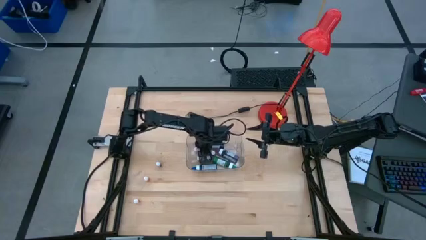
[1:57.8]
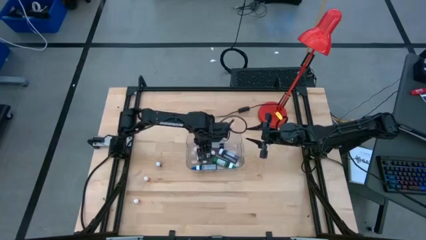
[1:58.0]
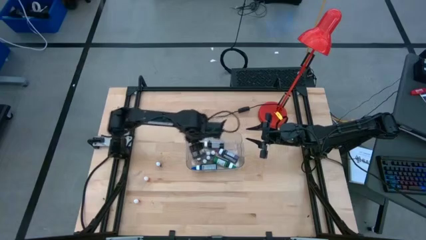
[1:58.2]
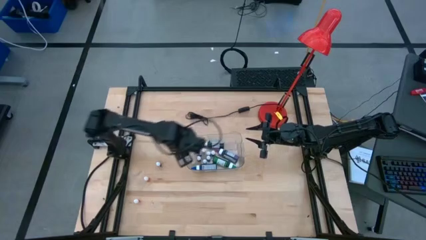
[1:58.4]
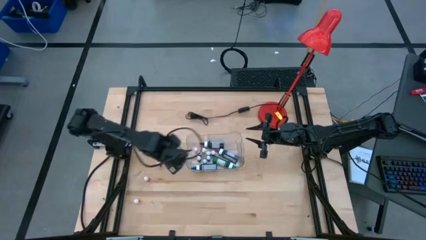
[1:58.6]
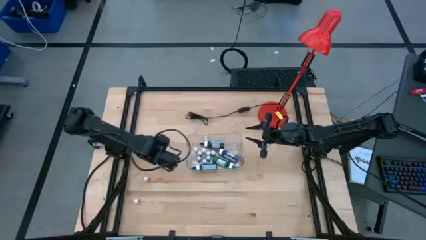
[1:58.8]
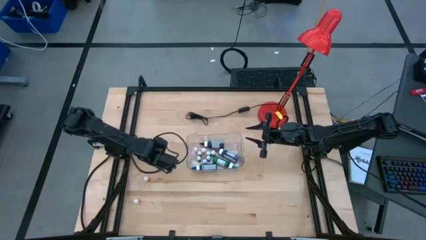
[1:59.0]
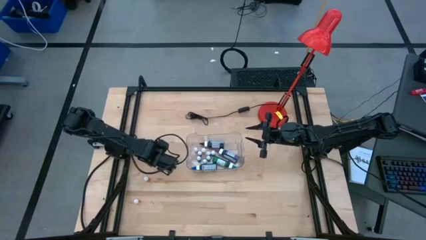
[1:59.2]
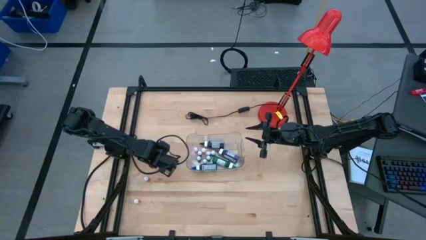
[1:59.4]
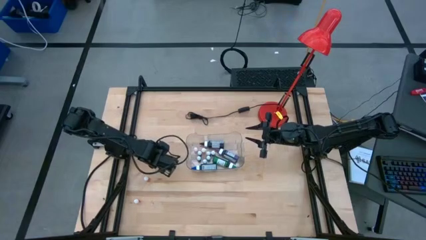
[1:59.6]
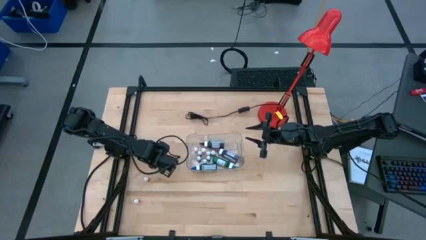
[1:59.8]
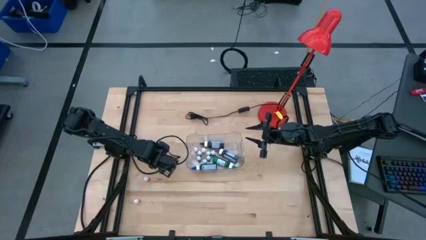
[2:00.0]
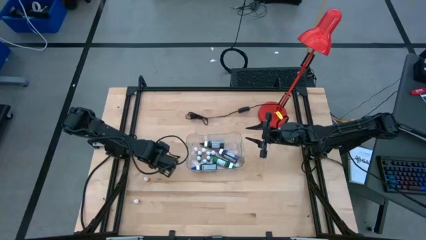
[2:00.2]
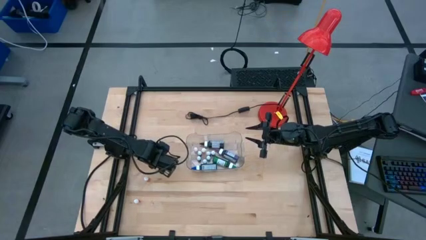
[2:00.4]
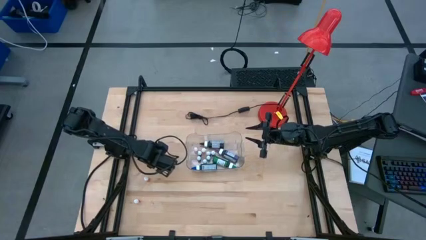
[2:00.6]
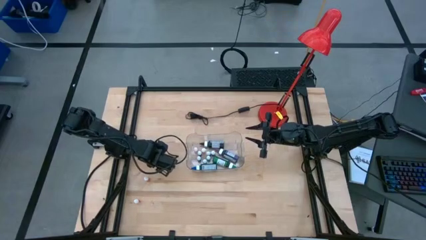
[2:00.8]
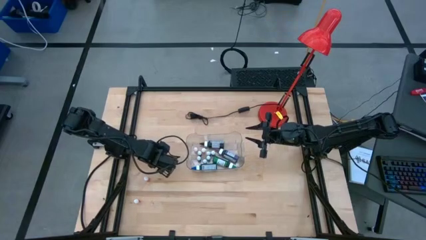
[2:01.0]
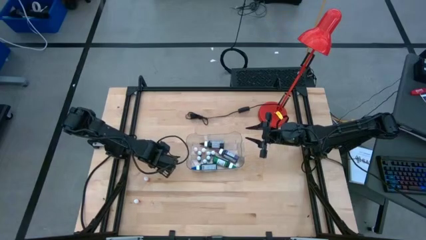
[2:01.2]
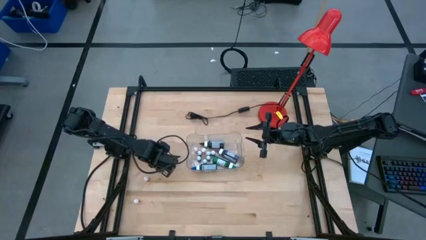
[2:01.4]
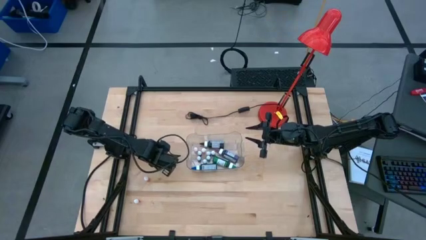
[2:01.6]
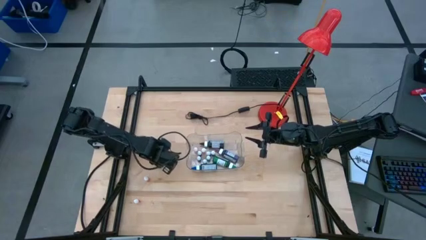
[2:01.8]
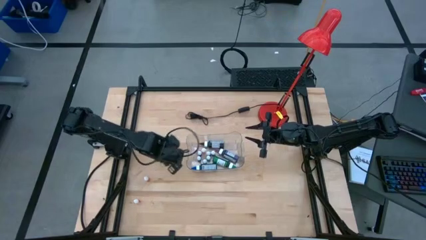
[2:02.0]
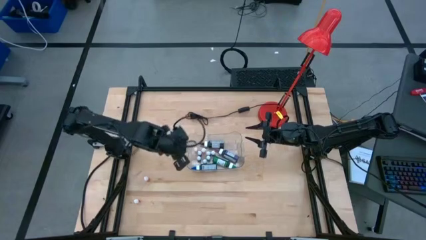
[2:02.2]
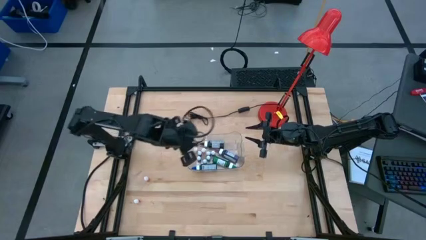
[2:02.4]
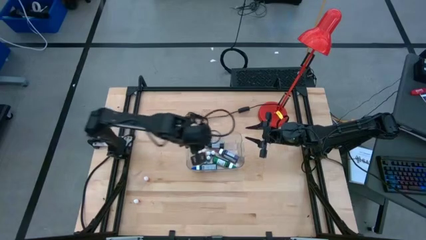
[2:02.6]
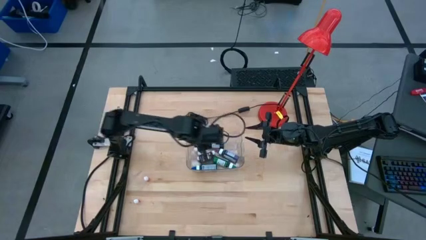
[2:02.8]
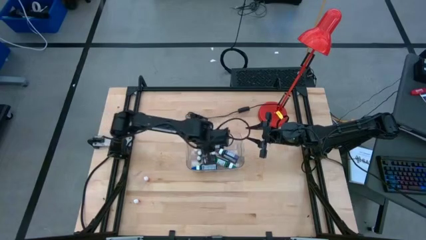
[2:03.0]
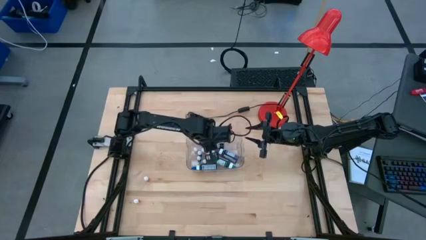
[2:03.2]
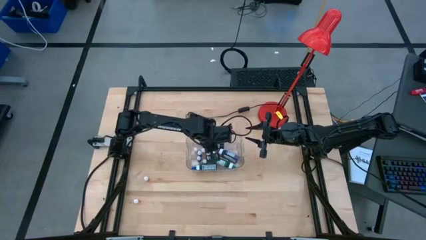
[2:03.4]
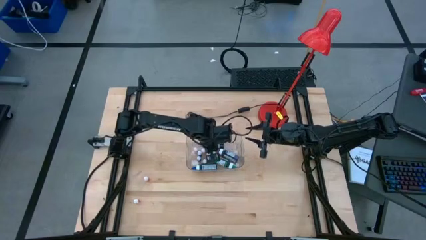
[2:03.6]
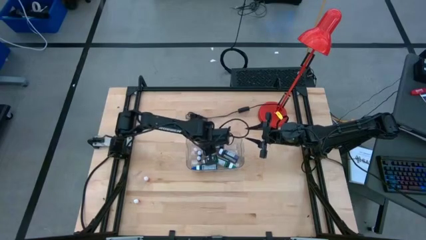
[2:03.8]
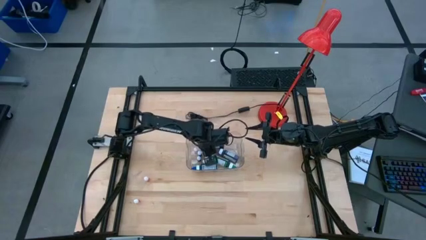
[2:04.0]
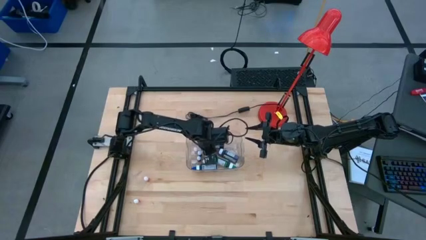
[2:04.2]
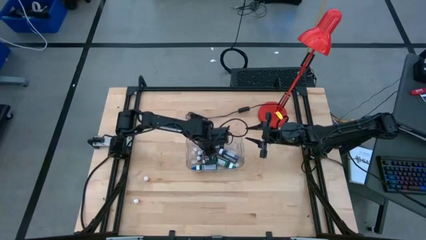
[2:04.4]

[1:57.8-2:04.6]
Task: Pick & Place food coloring
Put the small blue food coloring bottle into the transparent bin

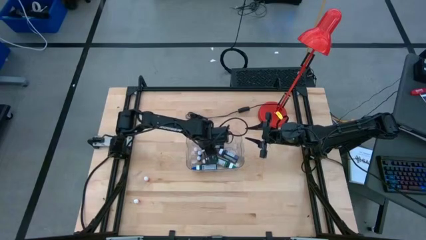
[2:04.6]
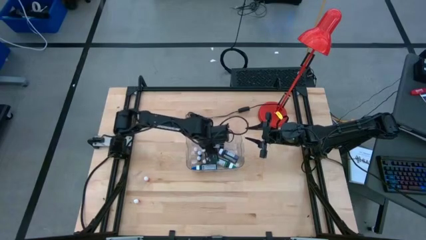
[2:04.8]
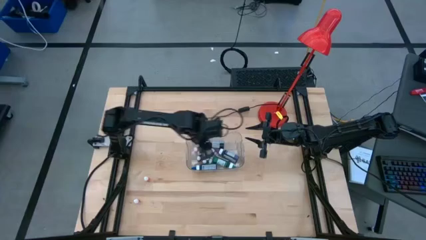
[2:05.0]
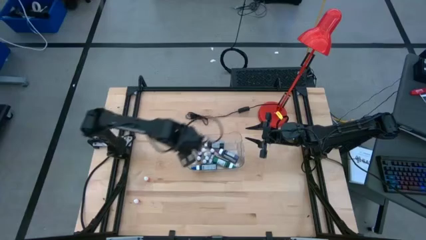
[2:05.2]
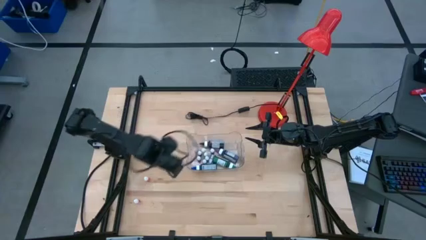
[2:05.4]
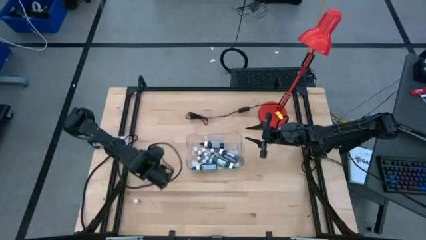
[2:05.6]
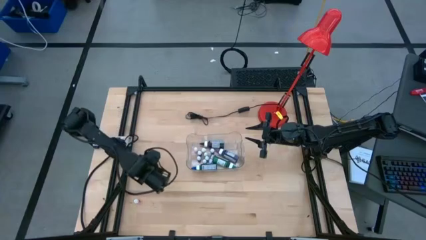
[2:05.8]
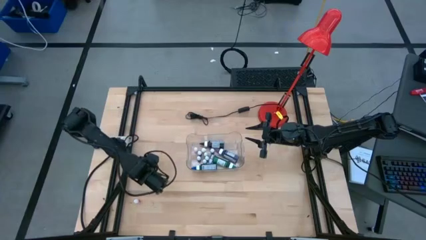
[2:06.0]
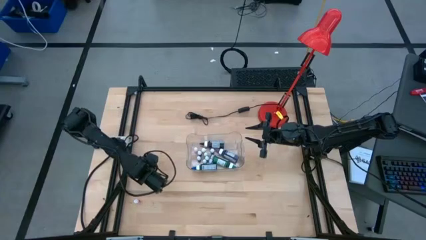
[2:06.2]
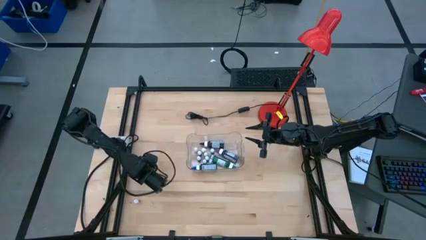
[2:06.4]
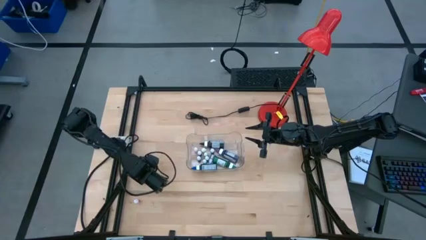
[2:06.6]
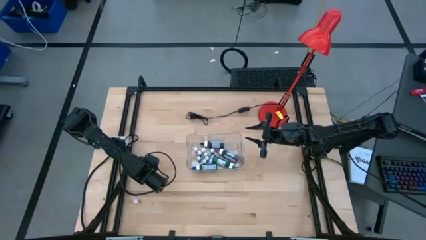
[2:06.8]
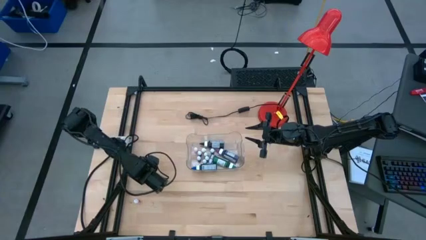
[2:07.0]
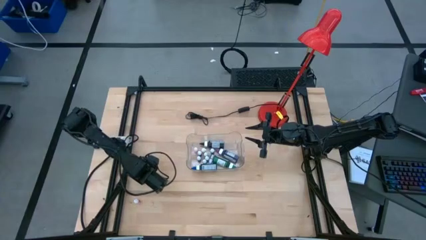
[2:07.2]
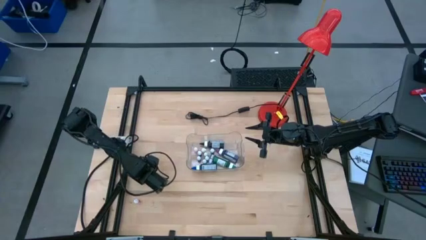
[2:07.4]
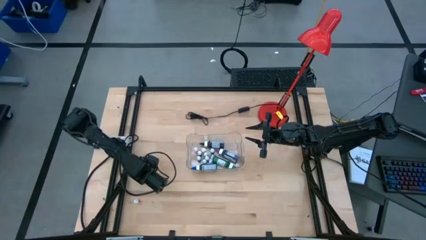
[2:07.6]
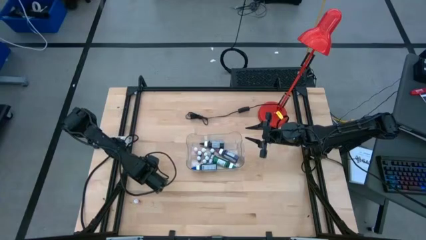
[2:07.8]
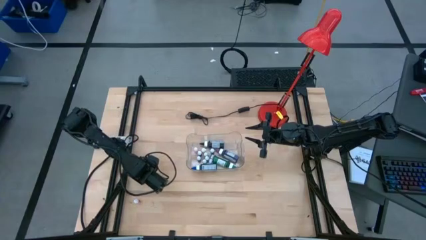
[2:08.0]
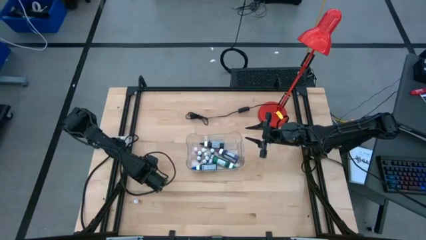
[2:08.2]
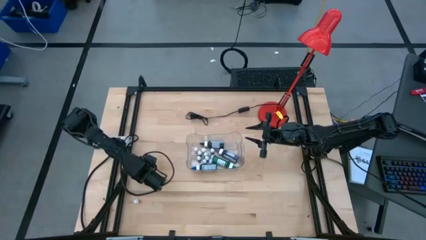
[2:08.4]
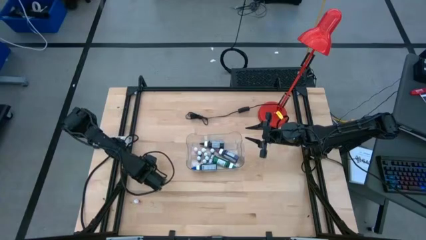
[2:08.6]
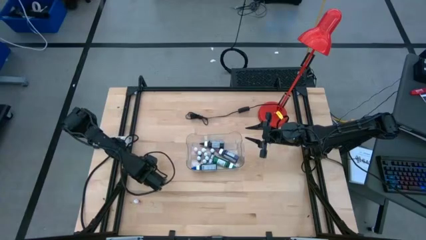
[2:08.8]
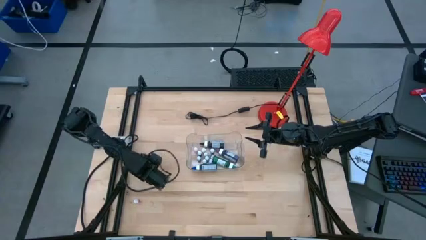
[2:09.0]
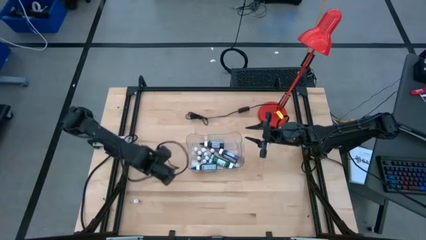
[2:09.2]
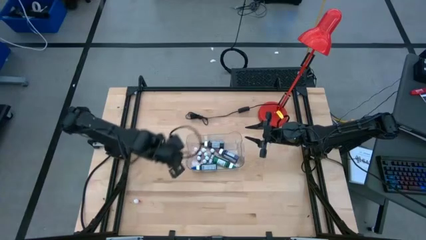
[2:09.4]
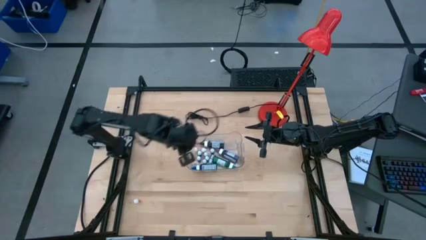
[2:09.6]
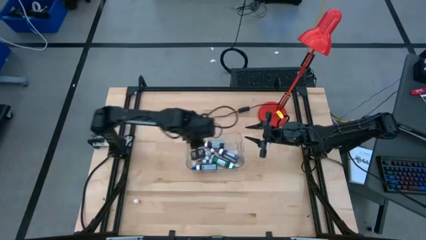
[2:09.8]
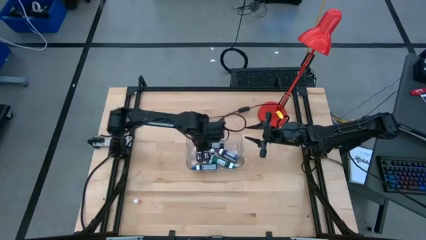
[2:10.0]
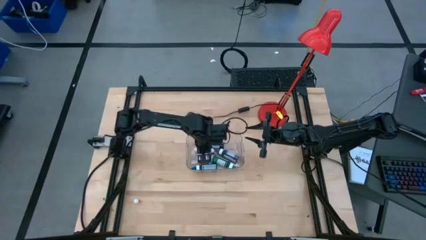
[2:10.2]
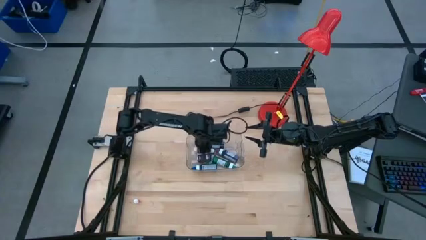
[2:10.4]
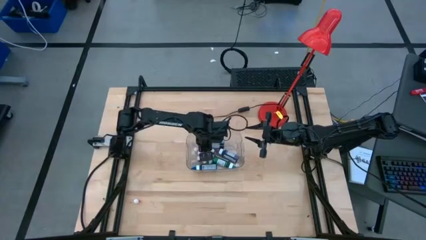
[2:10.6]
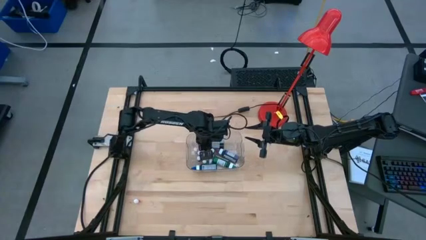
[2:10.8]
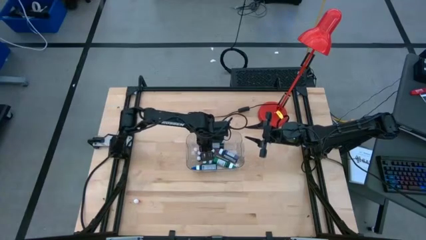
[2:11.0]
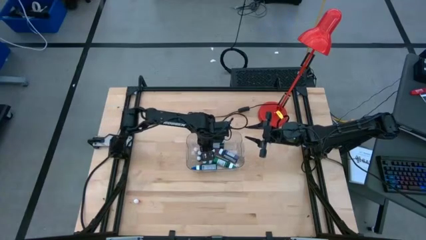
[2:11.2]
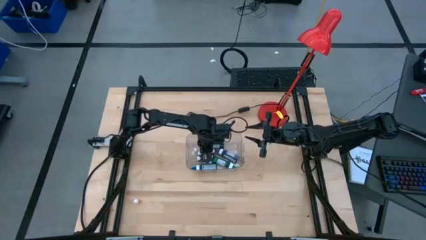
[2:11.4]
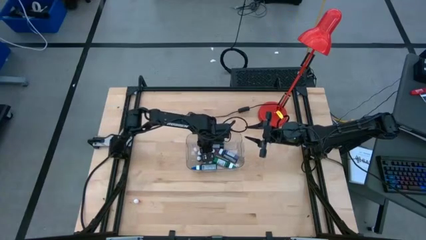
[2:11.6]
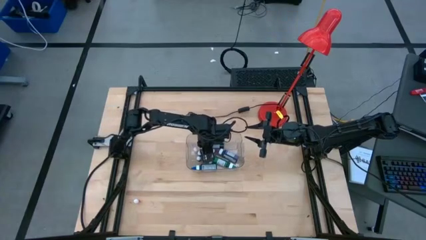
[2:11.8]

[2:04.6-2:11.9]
Put the small orange food coloring bottle into the transparent bin

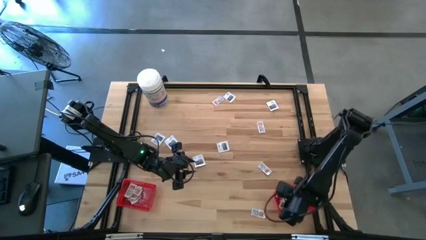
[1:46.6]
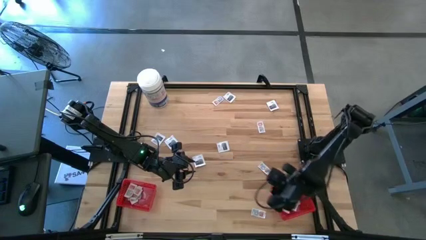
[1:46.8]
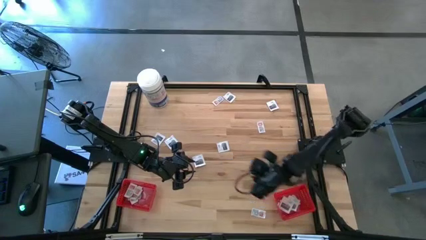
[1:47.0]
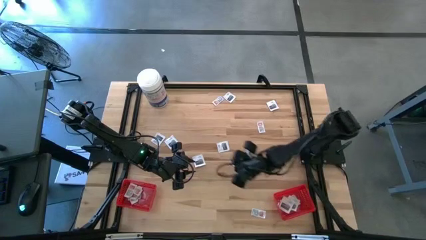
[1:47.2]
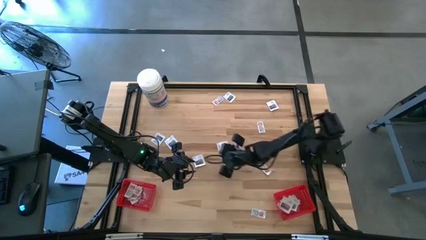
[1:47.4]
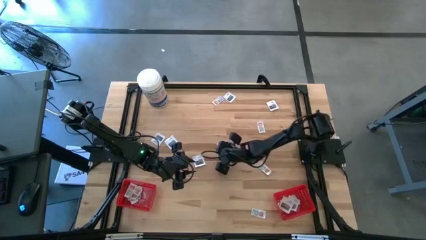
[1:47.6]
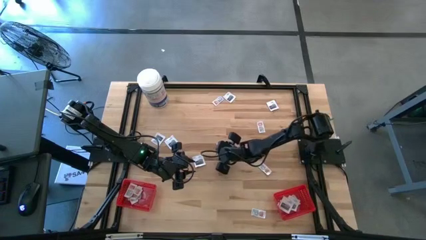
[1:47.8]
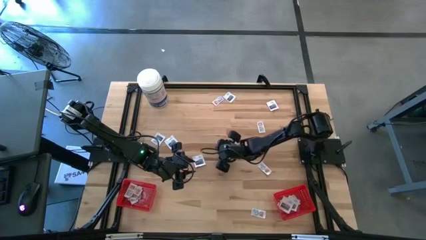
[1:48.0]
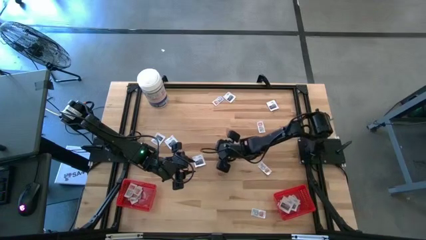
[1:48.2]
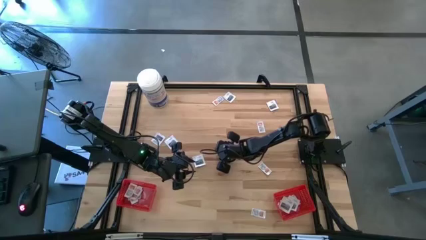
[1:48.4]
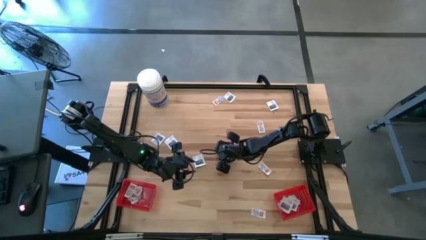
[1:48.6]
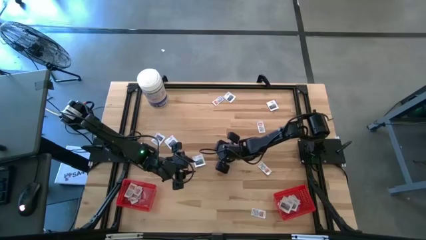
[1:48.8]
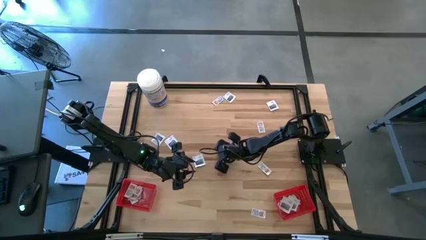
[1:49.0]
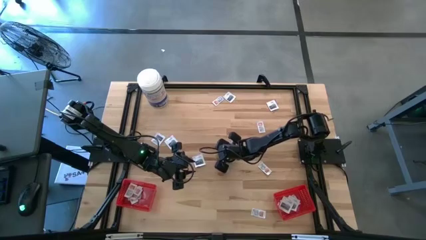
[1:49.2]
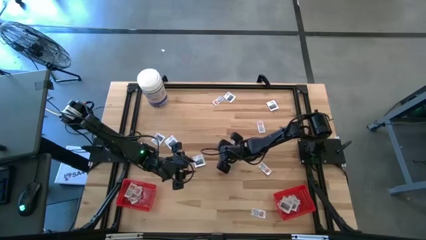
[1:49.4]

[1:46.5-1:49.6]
Task: Pick & Place First Aid Supplies
Put the towelette pack into the right red bin
